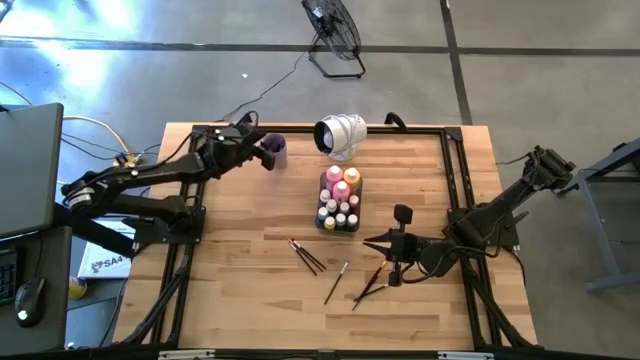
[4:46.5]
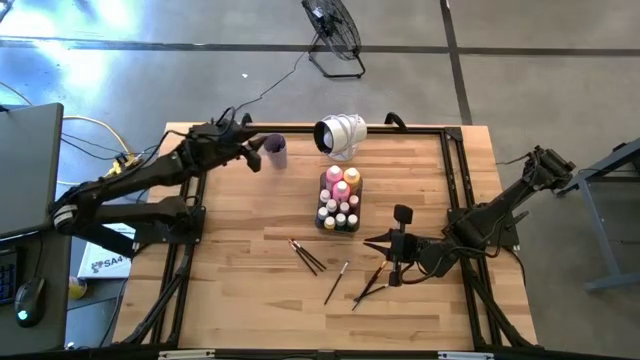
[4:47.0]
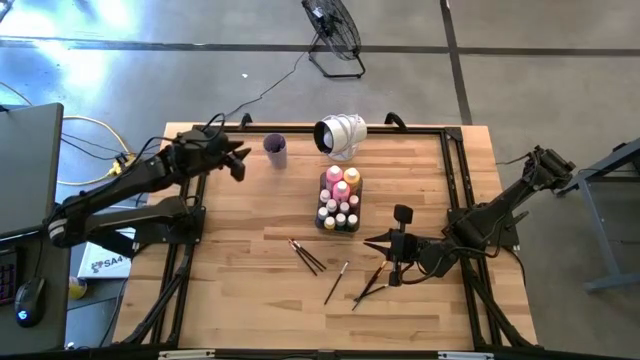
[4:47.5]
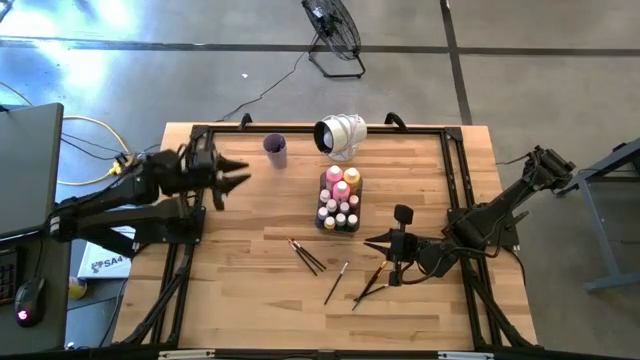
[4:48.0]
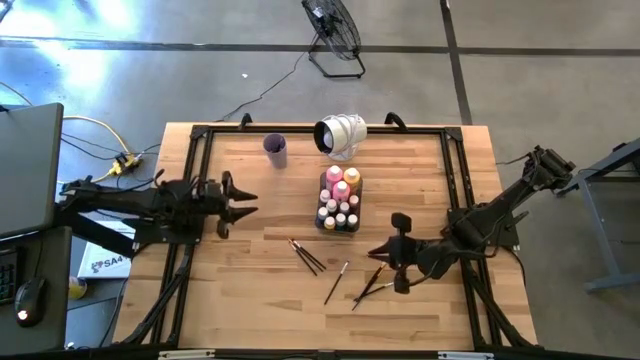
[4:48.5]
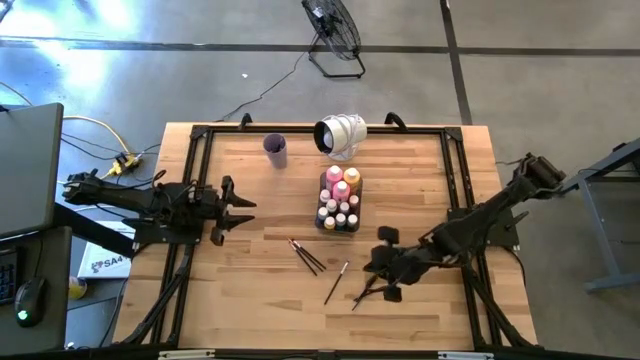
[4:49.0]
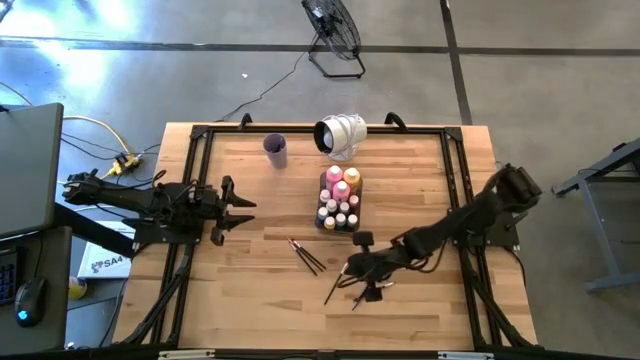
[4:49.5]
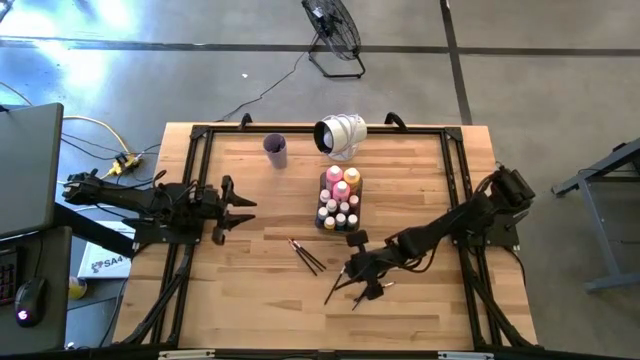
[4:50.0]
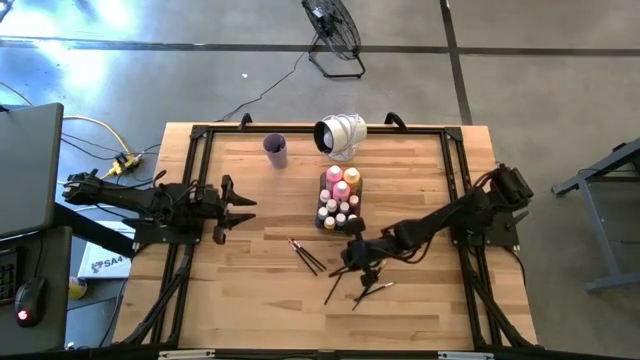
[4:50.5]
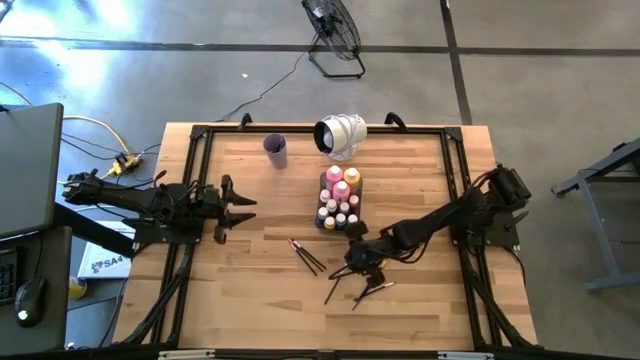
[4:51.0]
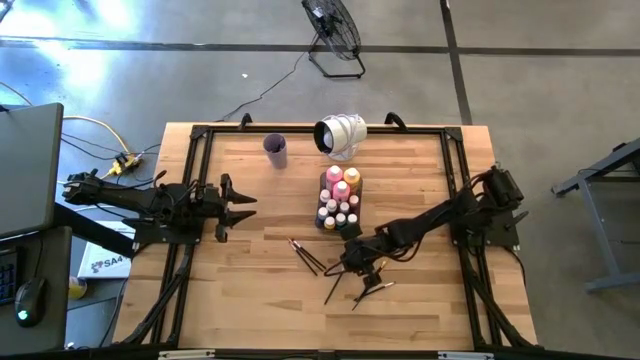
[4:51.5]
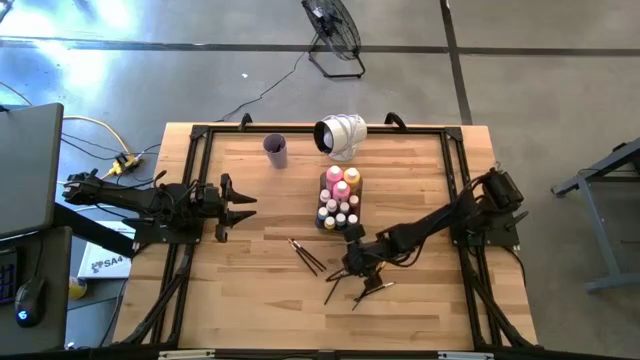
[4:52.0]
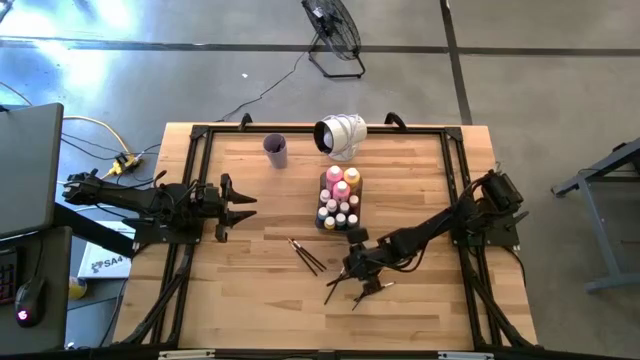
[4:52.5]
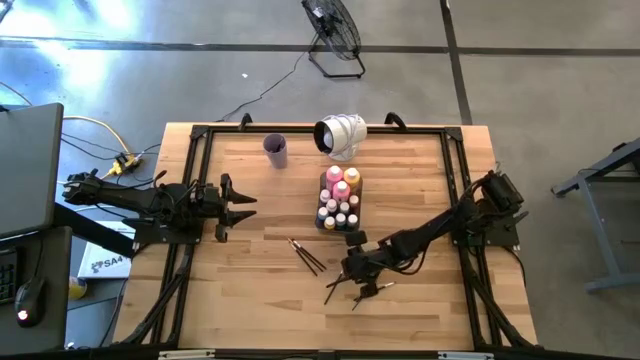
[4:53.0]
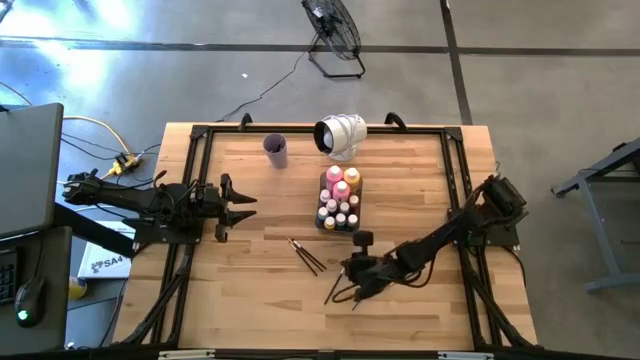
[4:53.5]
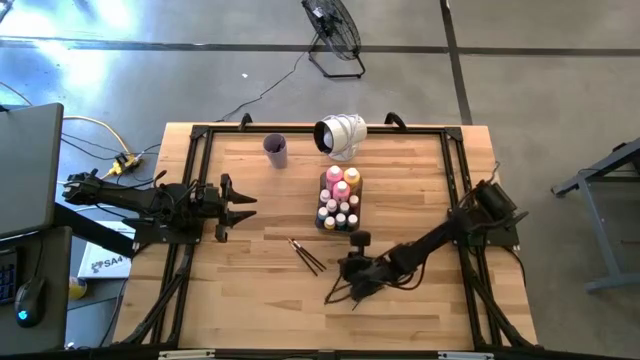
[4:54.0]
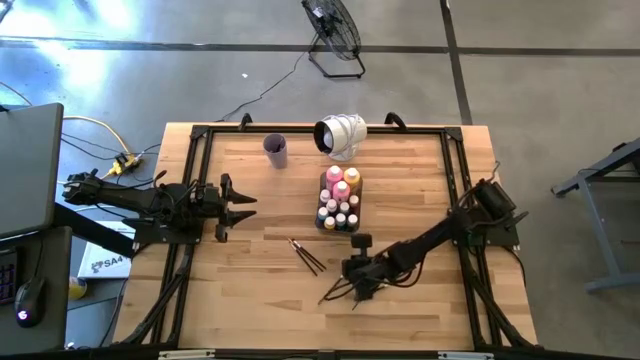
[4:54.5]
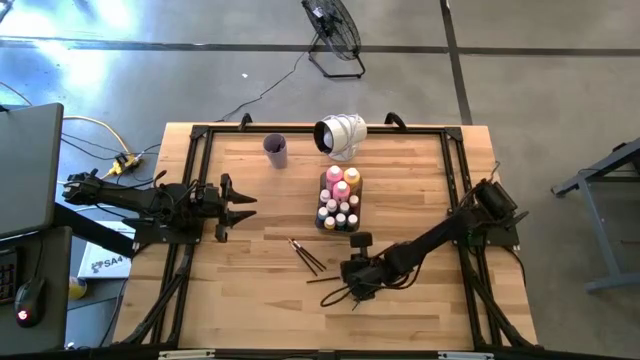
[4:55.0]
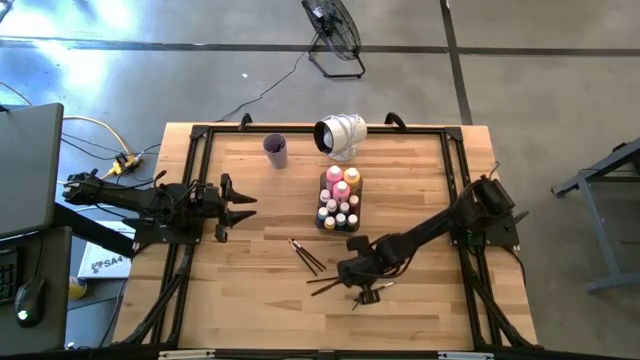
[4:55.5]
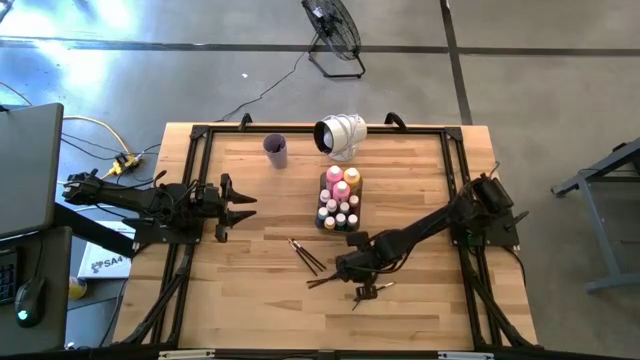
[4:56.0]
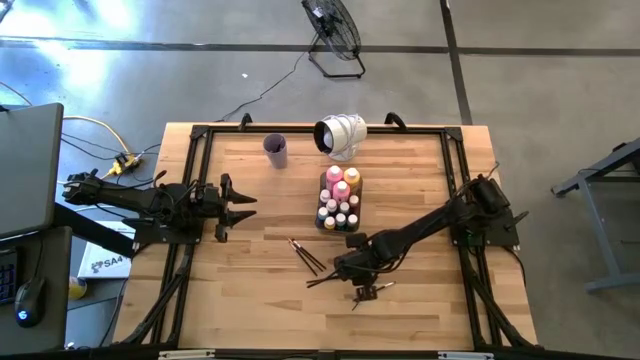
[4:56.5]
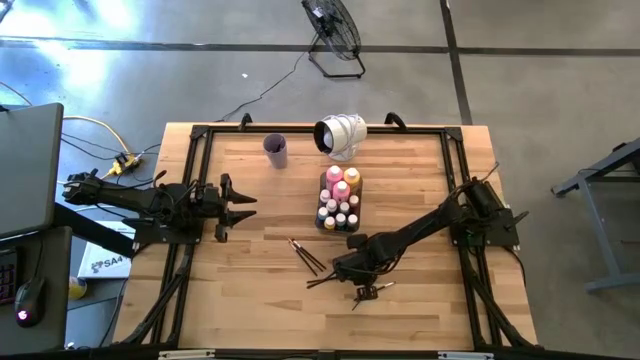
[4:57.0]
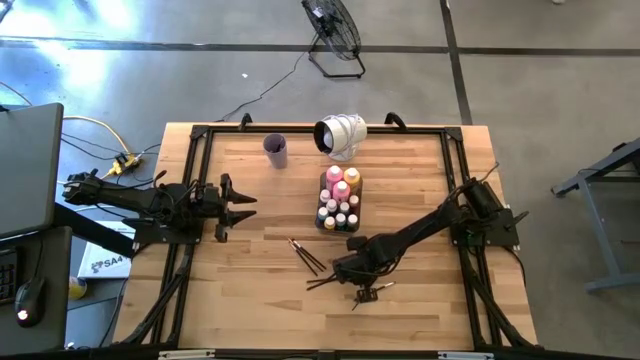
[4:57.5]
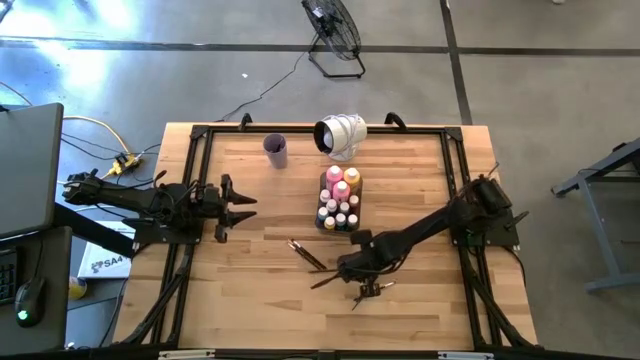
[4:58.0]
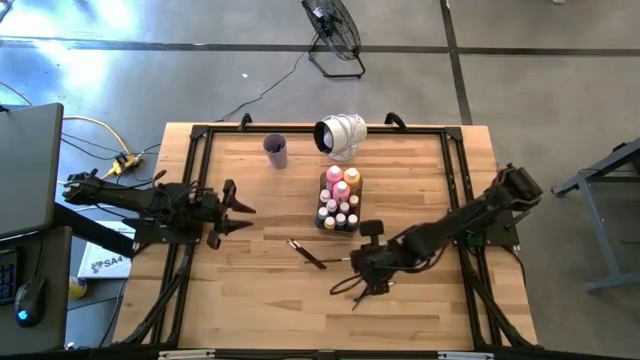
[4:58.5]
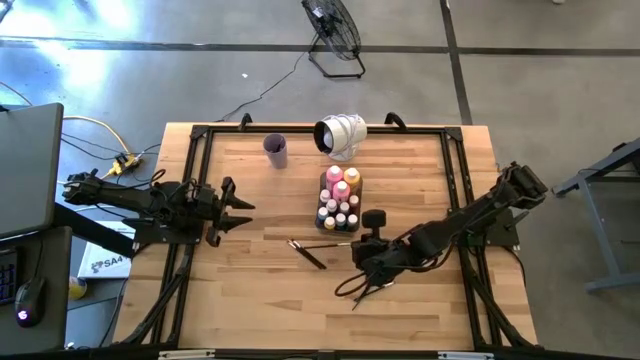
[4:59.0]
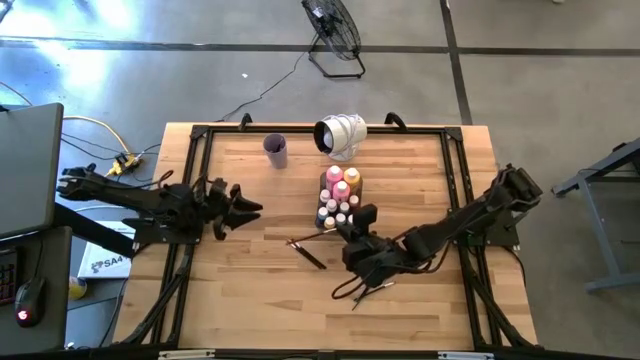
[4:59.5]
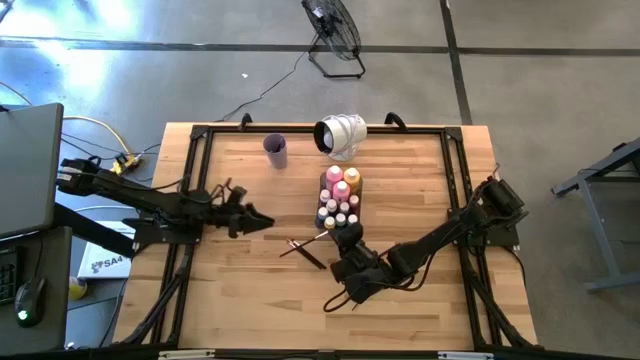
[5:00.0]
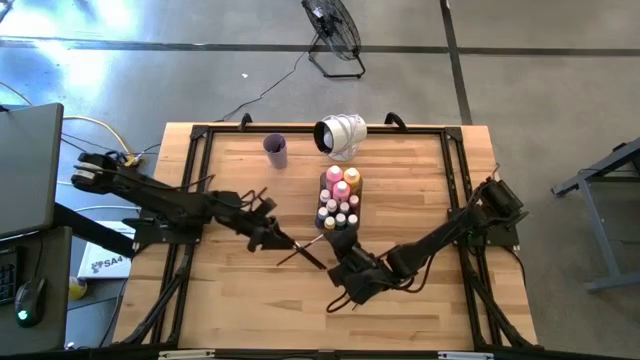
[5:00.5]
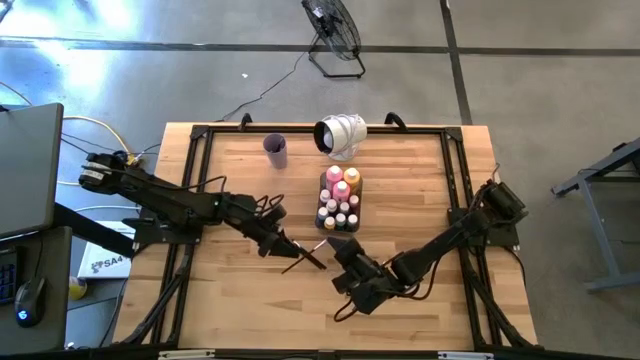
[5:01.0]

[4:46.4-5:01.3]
Task: Pick & Place Paint Supplies
Put the silver paint brush into the violet cup

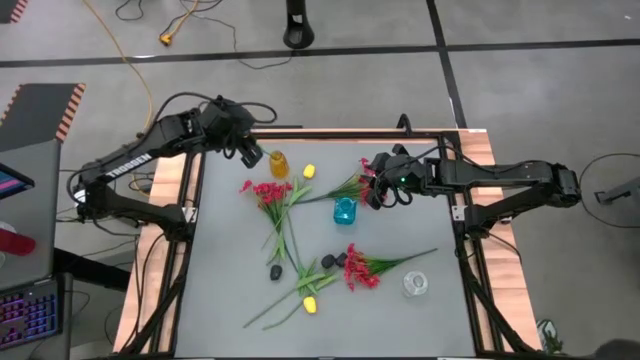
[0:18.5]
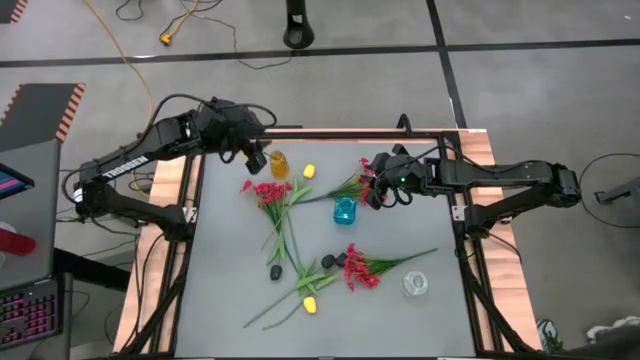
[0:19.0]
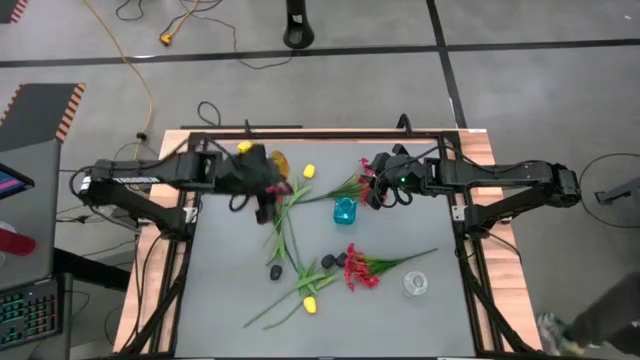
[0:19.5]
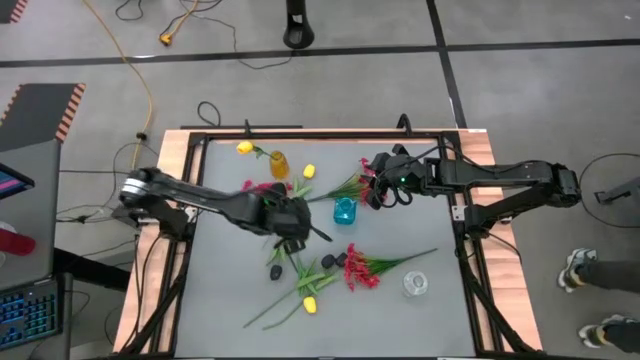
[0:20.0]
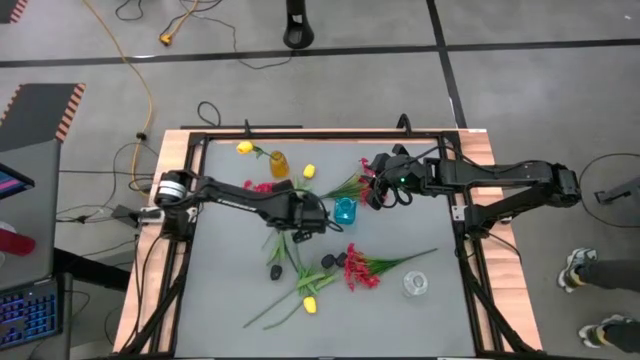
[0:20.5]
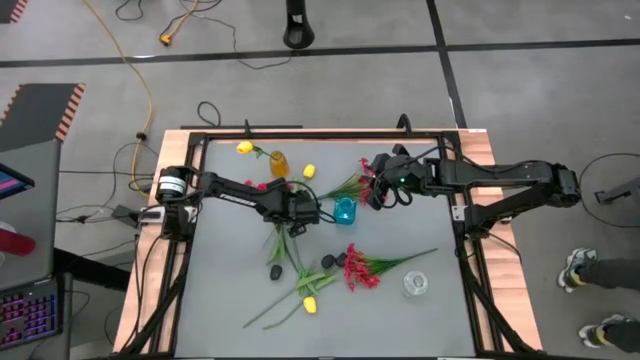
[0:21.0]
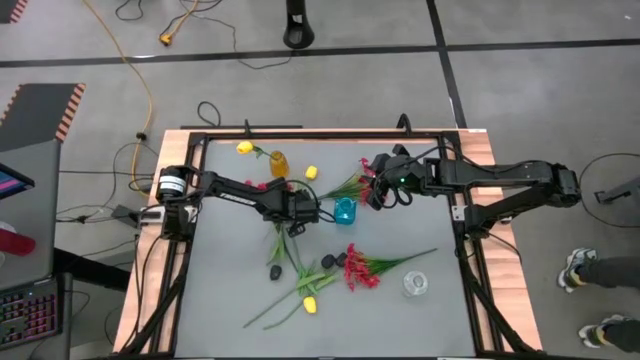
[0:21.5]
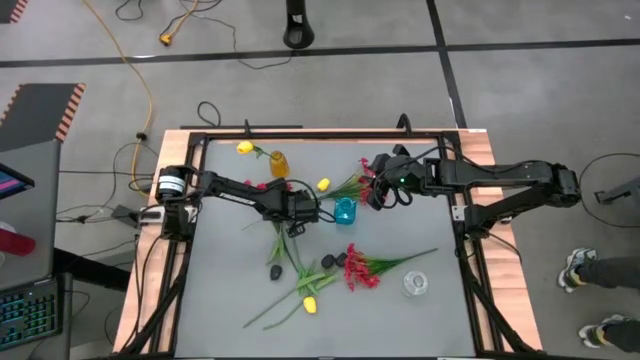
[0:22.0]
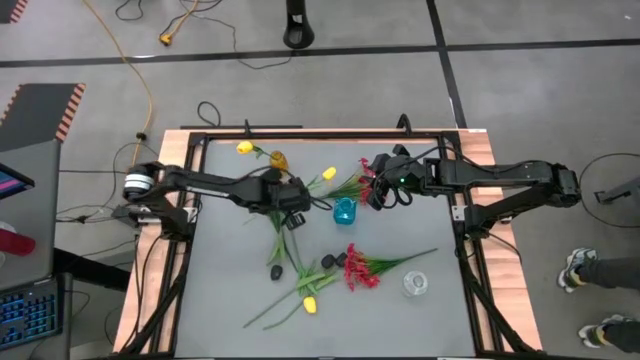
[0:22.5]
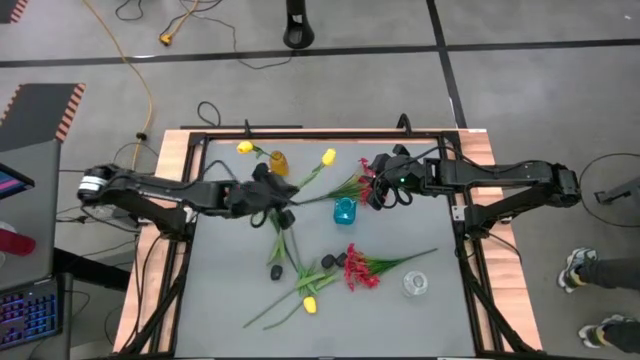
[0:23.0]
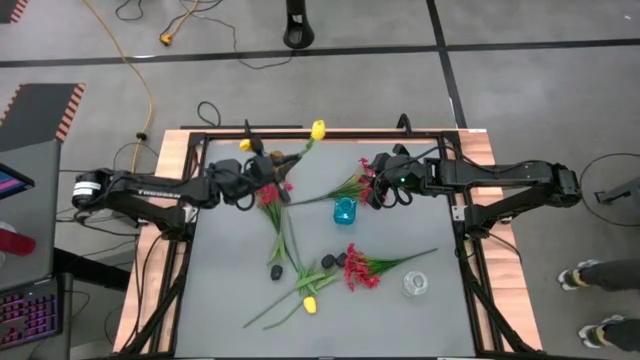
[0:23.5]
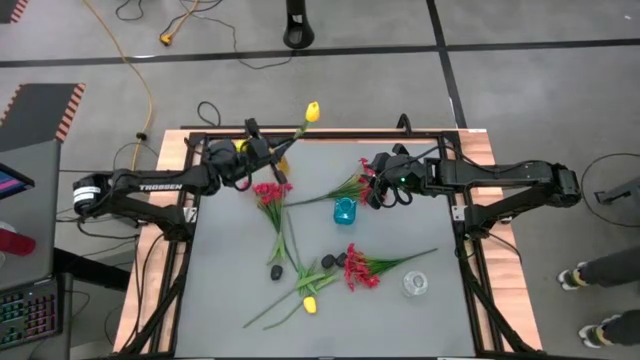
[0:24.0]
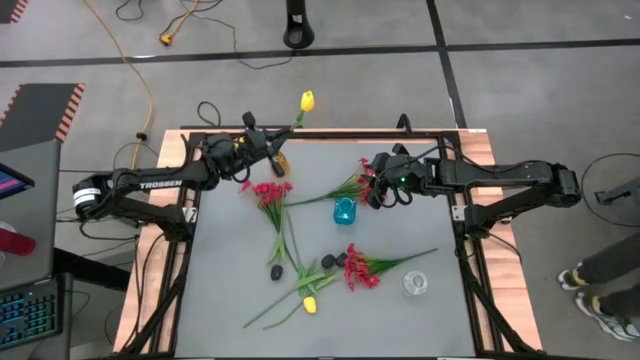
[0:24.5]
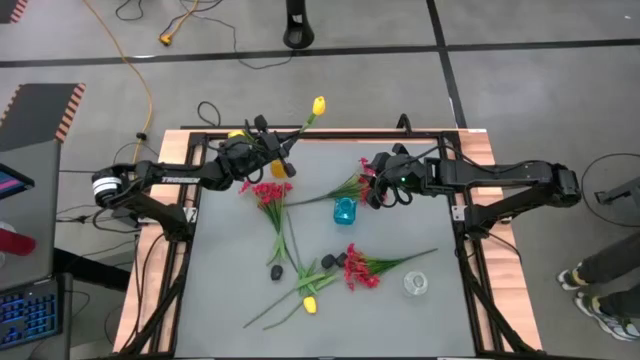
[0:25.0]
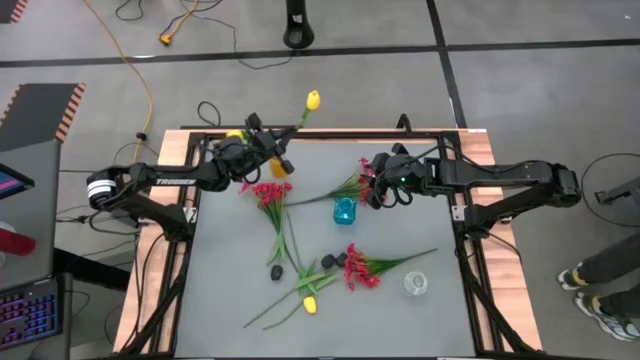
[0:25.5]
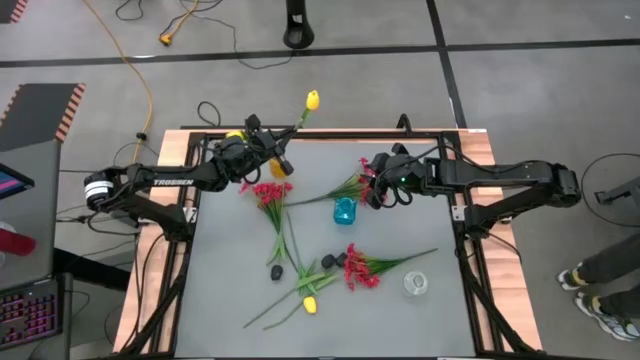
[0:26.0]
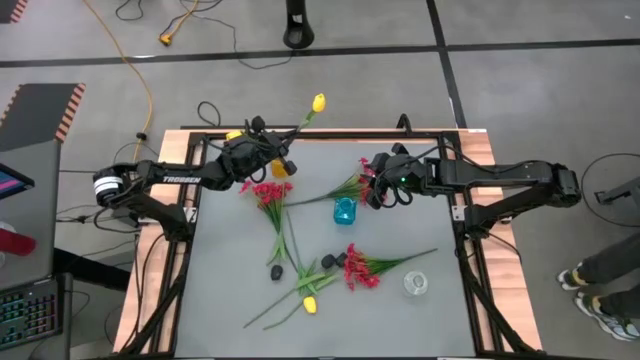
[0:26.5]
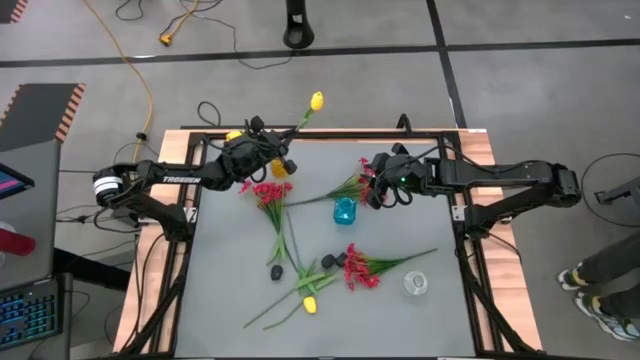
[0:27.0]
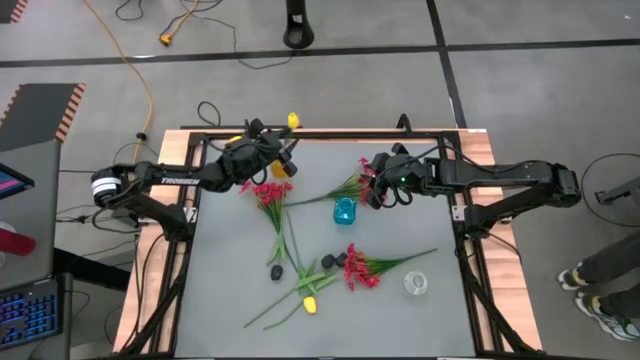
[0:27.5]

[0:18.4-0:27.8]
Task: Sort flowers into vase by color
Put the top yellow flower into the yellow vase
